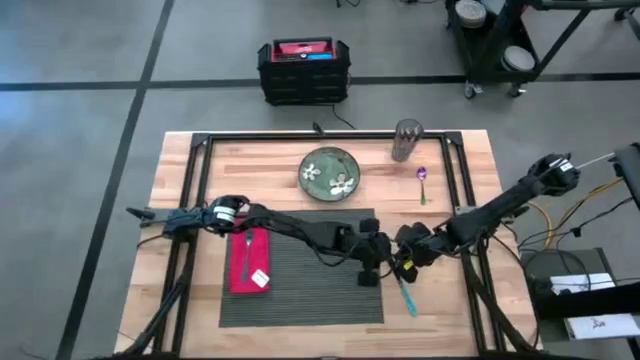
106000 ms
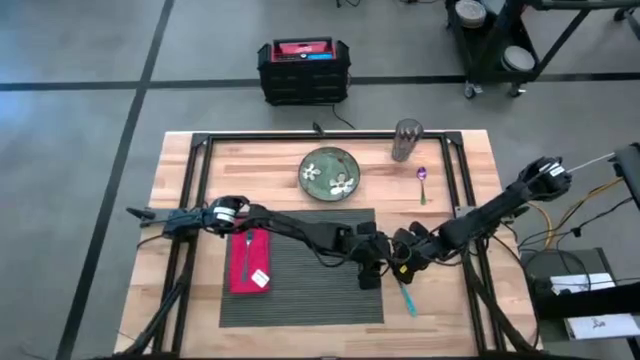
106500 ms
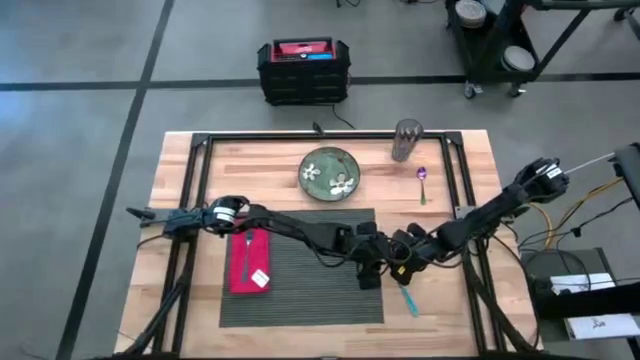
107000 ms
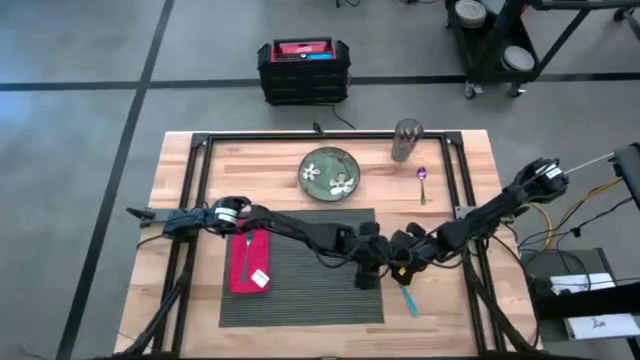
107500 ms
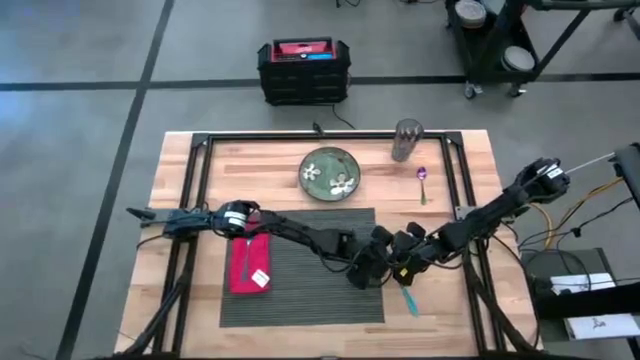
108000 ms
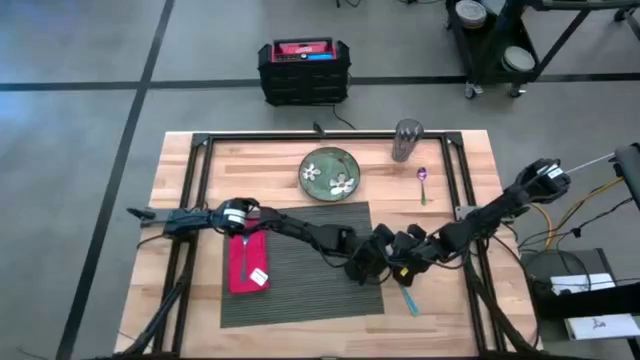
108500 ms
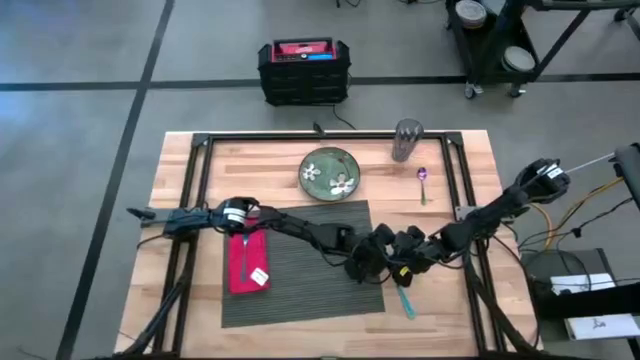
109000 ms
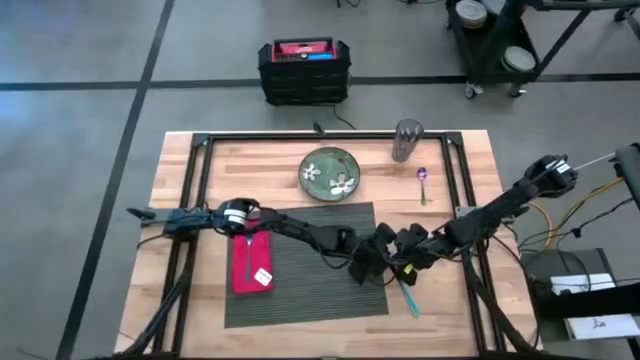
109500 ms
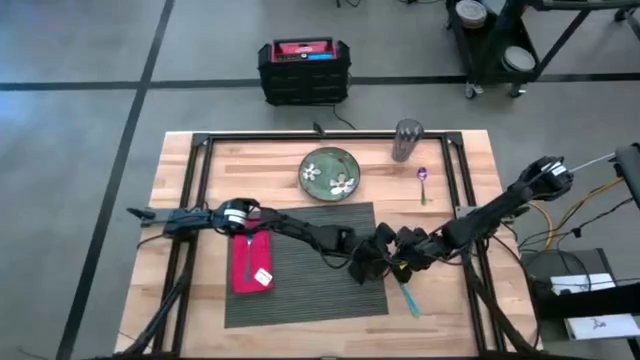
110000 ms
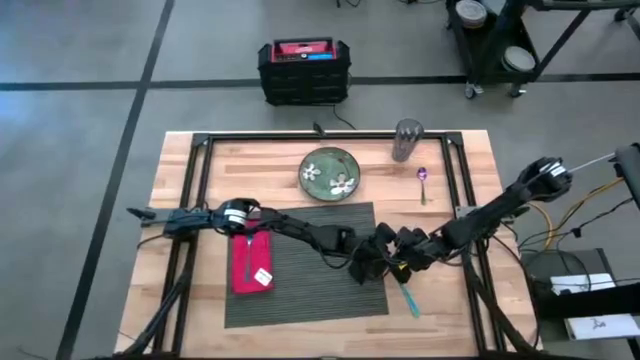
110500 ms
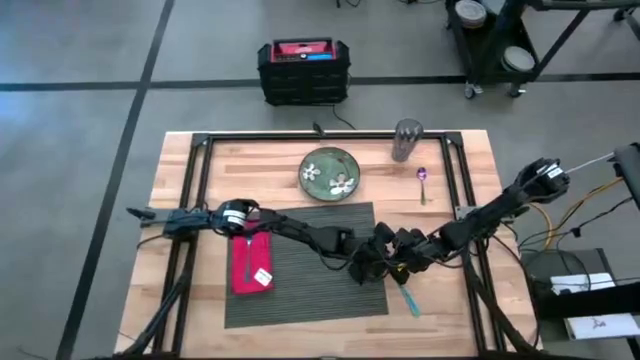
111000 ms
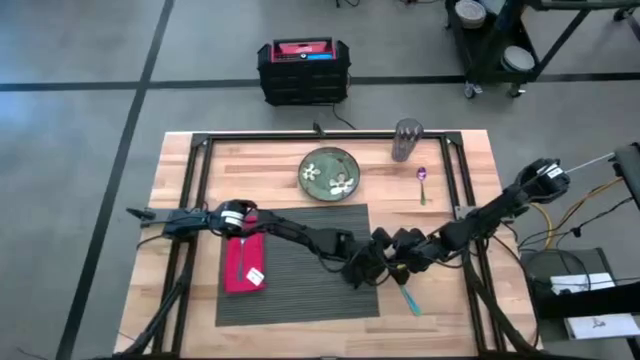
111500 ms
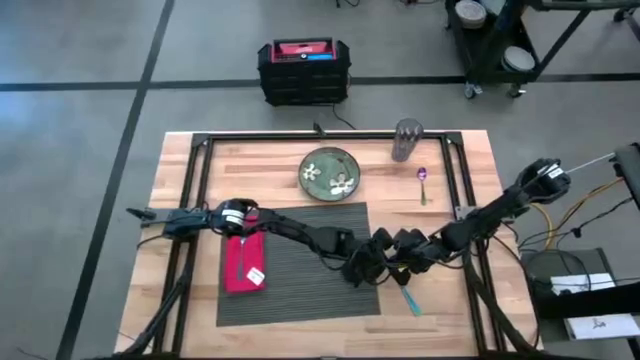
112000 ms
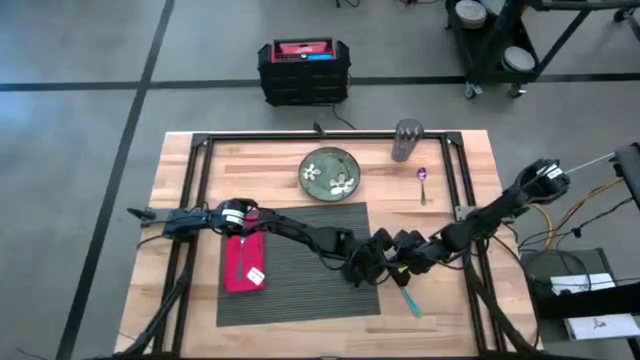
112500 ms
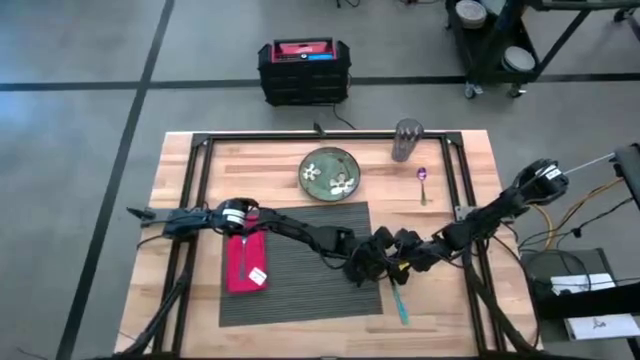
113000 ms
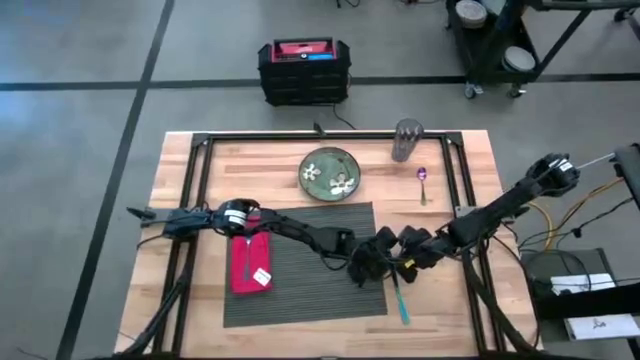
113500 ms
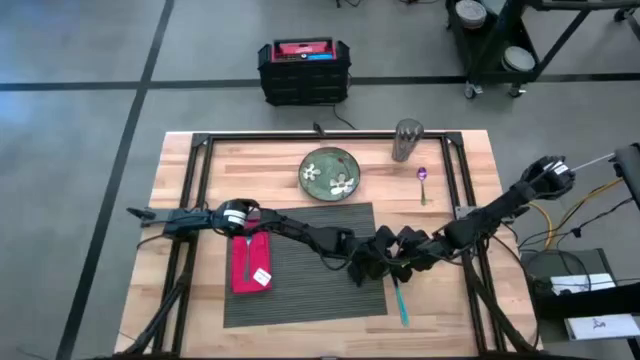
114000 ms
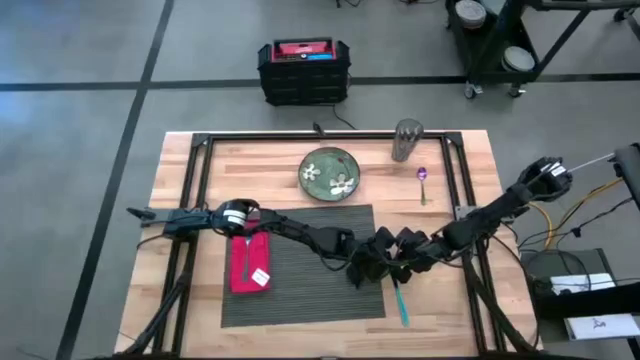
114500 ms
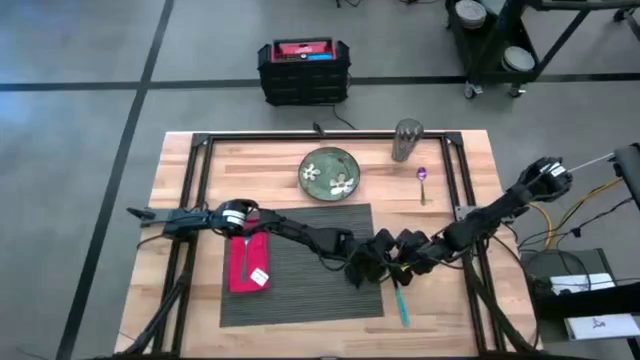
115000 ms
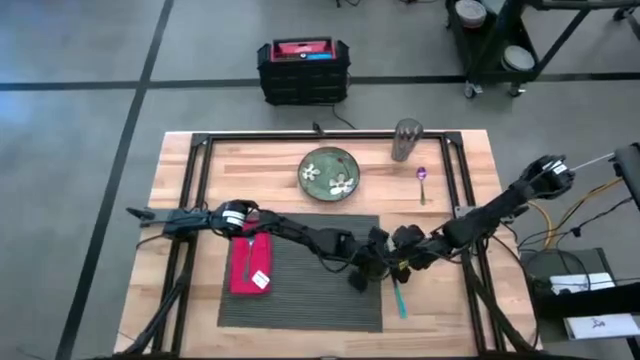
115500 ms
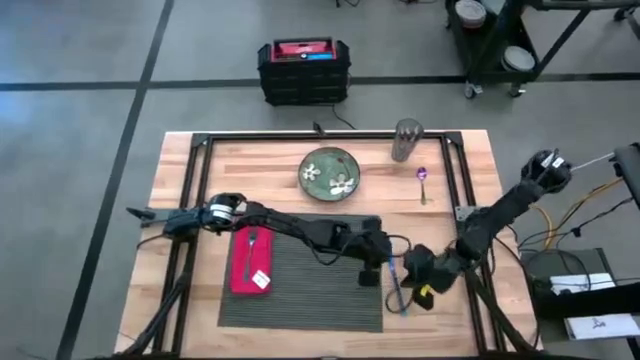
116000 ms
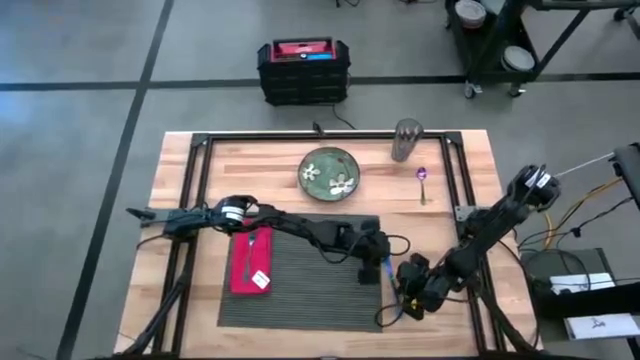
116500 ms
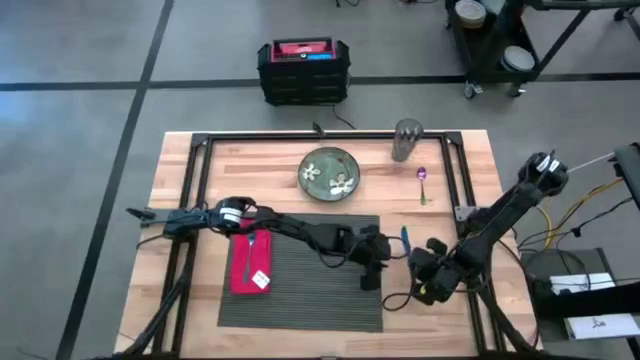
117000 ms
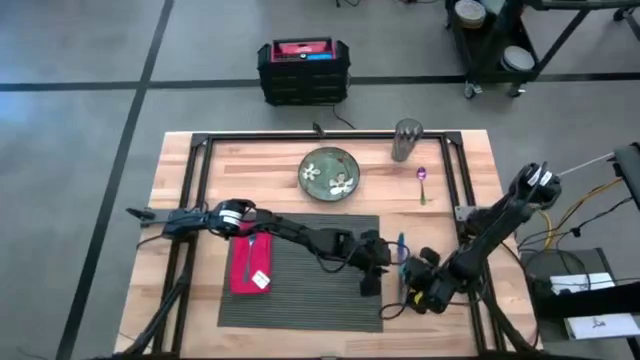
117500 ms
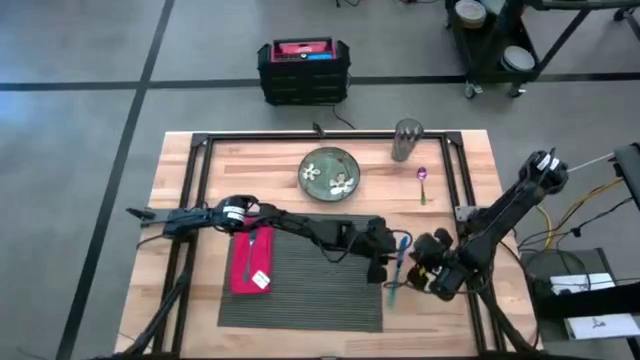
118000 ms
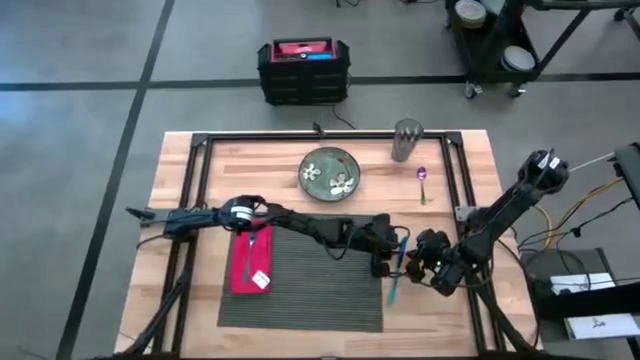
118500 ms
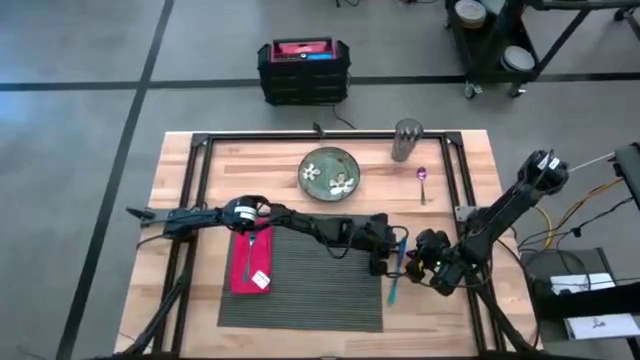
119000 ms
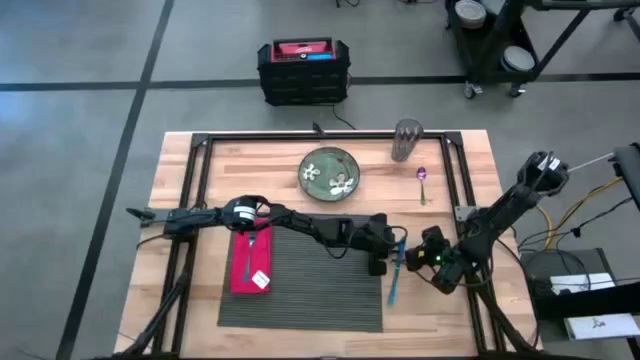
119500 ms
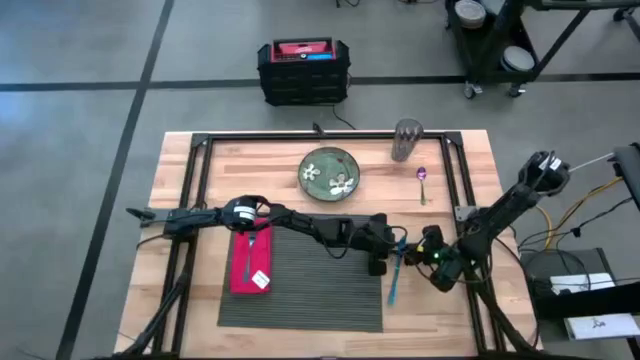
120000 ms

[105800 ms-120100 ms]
Task: Set table place
Put the blue table knife on the gray tablemat

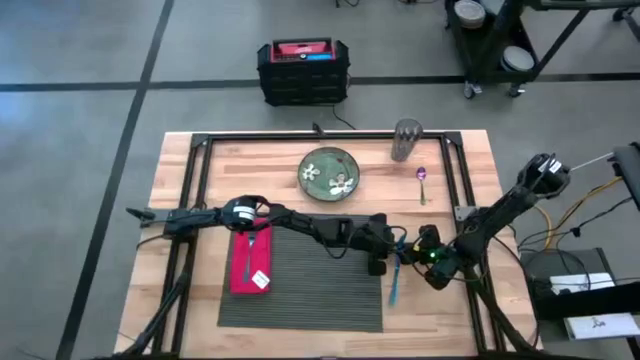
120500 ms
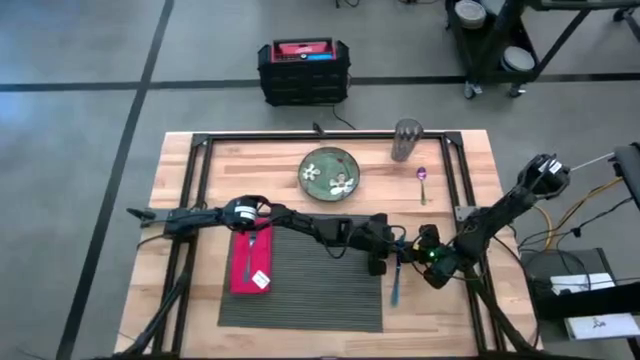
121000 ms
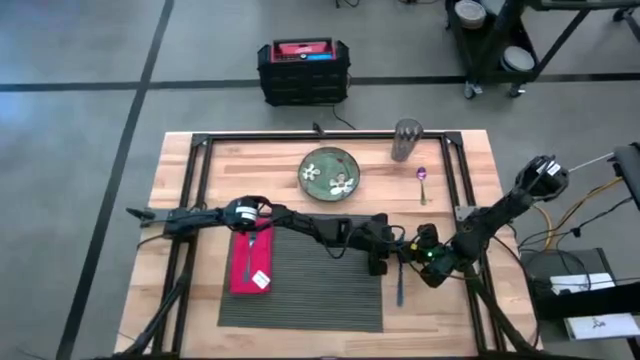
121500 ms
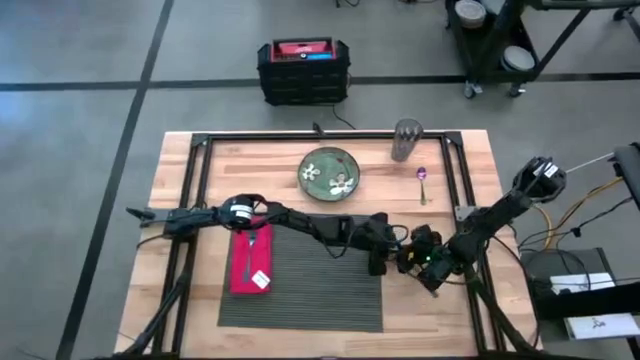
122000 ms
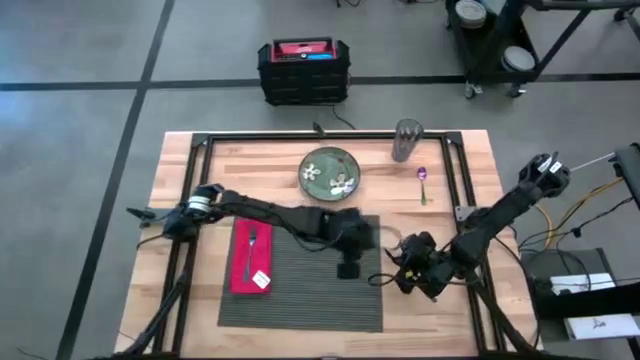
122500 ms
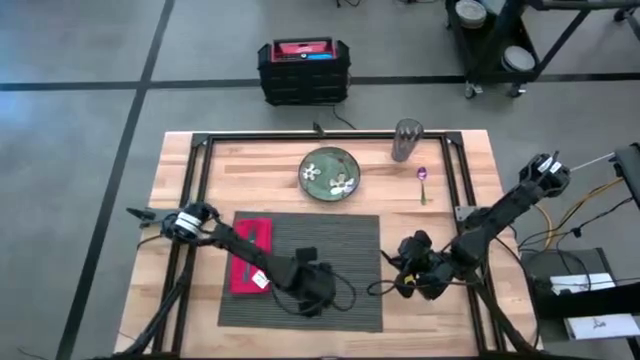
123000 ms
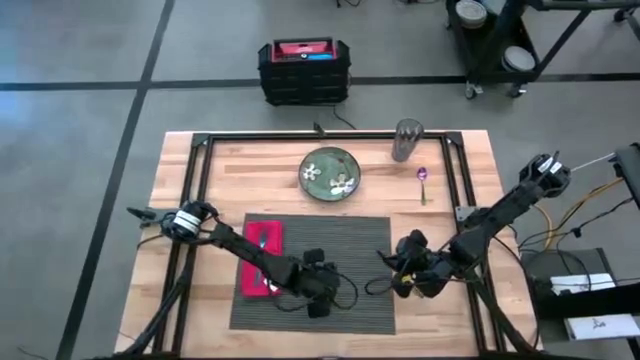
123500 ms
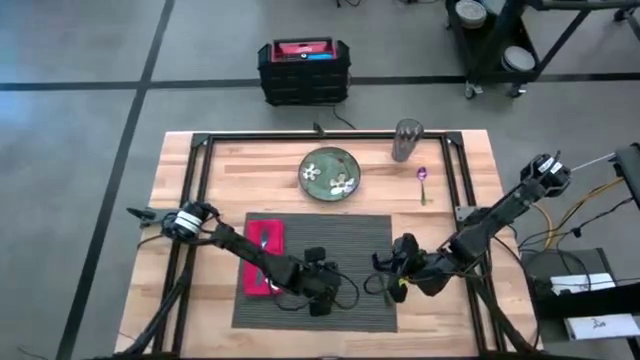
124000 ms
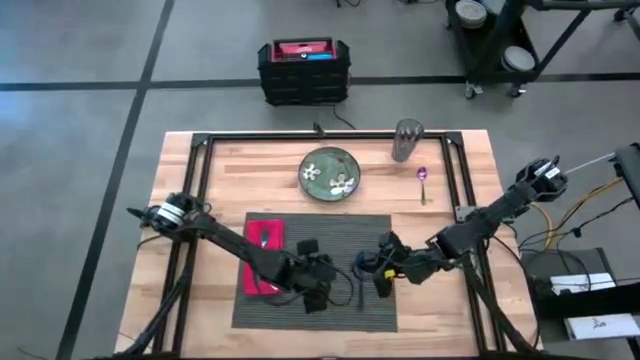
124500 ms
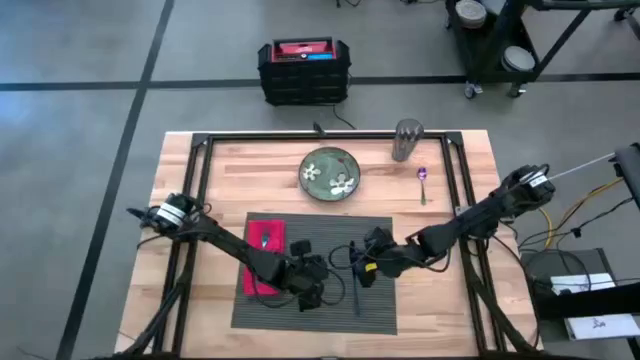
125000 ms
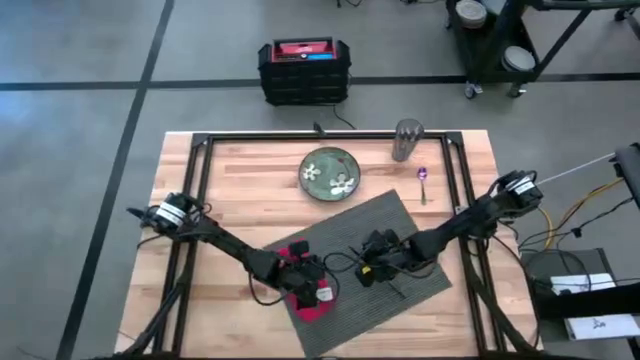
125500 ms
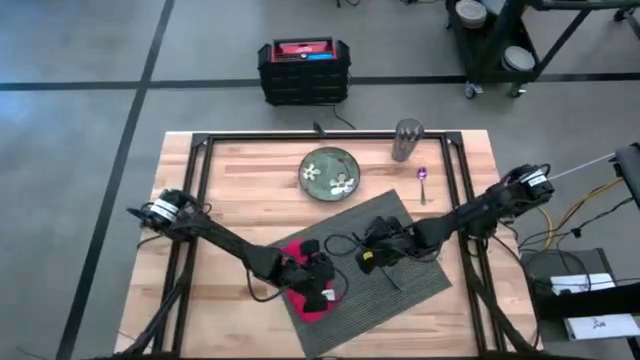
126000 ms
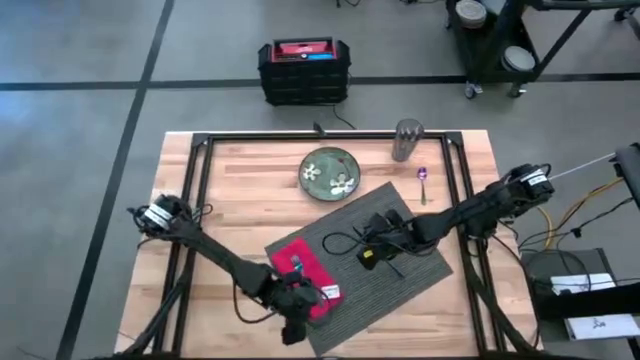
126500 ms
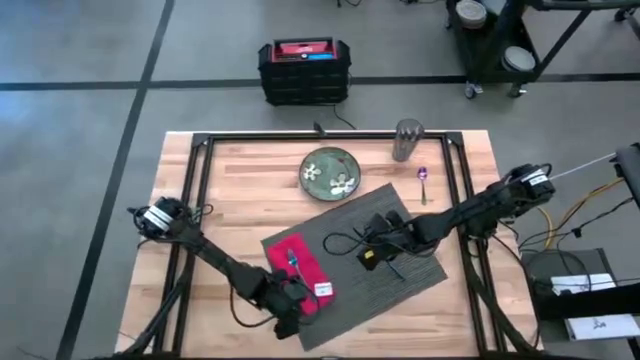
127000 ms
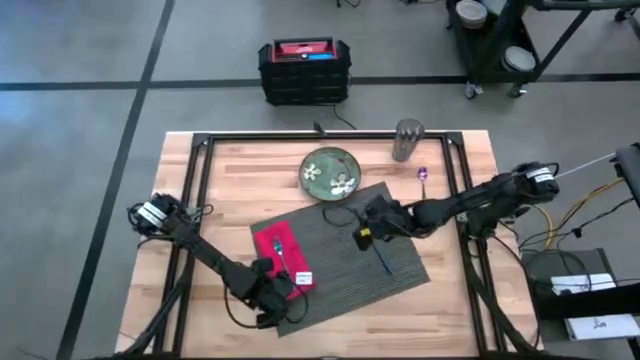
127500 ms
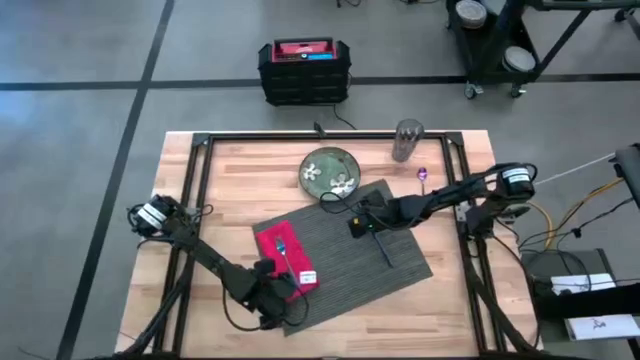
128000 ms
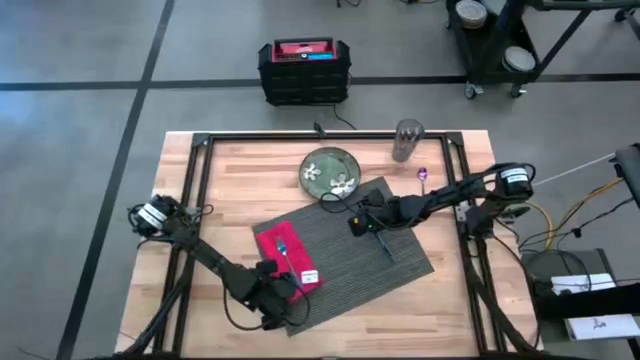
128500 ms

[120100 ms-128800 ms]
Put the blue table knife on the gray tablemat
